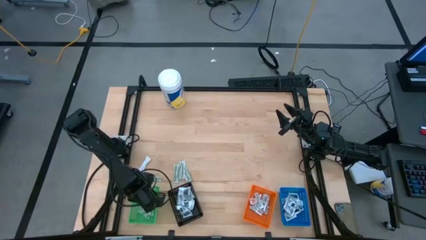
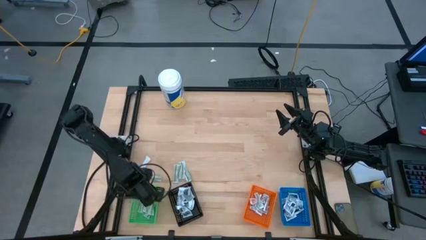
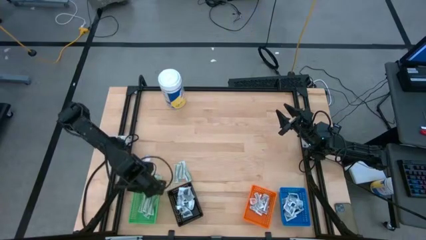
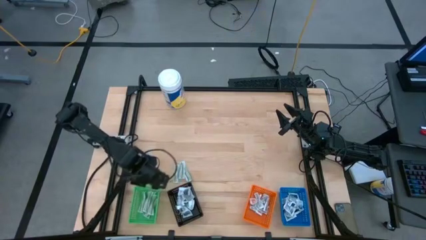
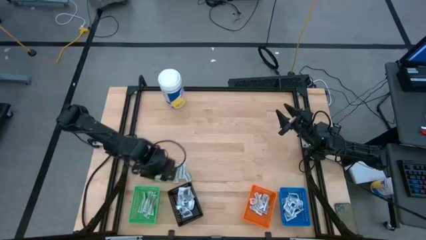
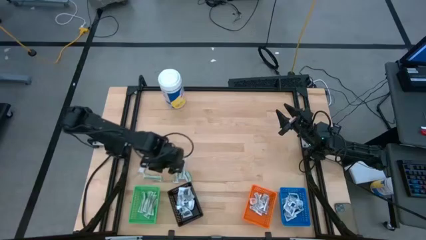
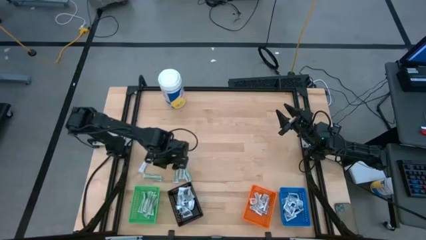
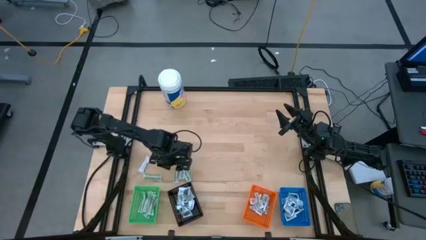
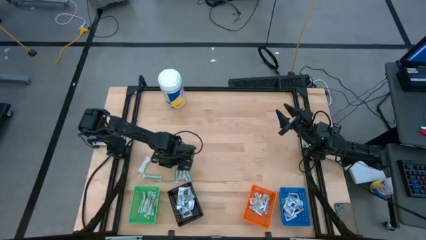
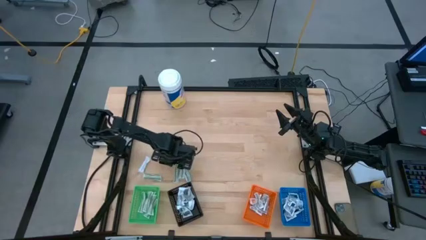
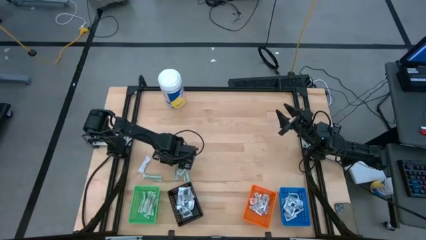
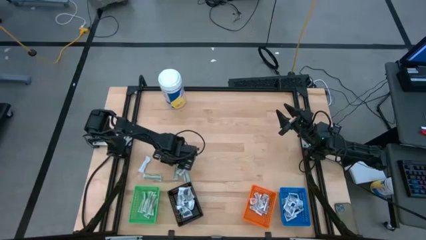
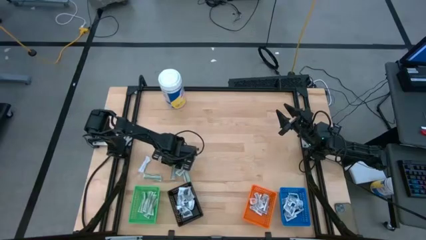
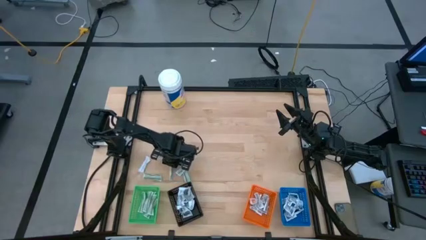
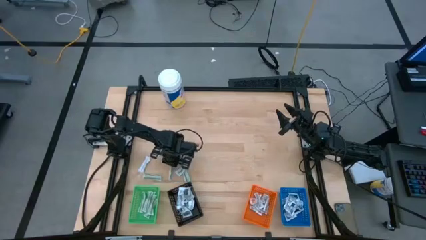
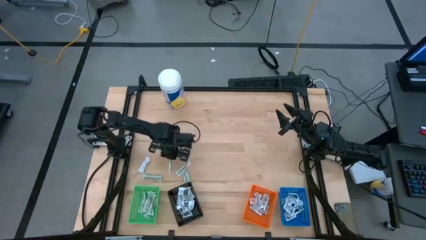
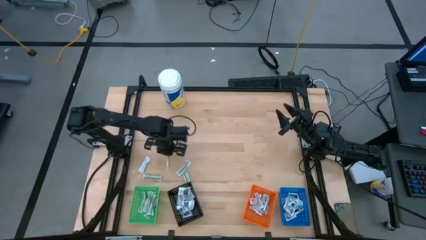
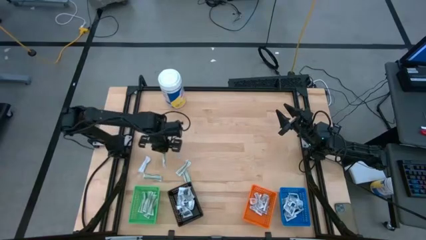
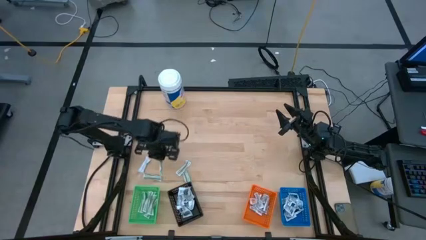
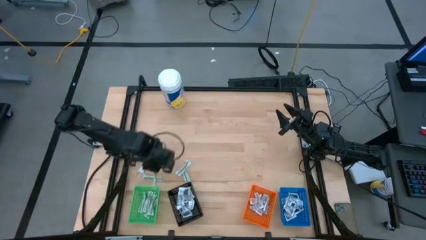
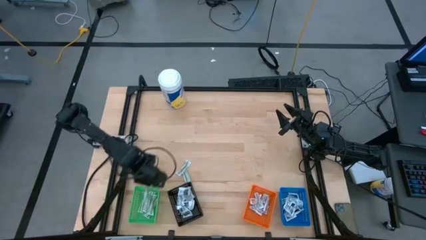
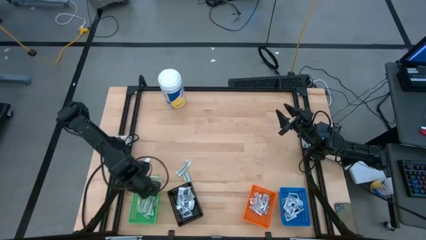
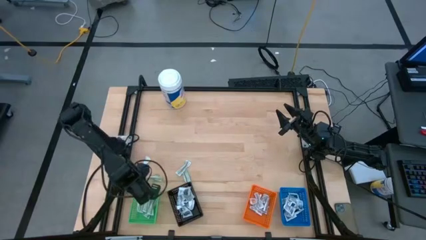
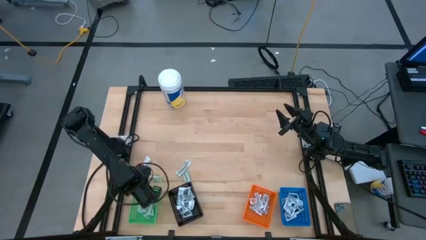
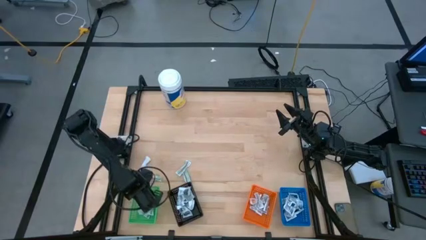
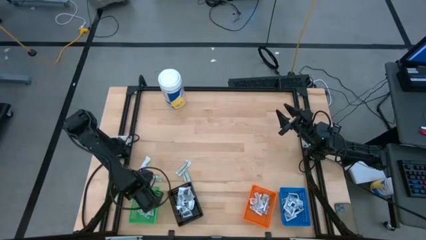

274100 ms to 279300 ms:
Task: Pick & Place First Aid Supplies
Put the bandage into the green bin

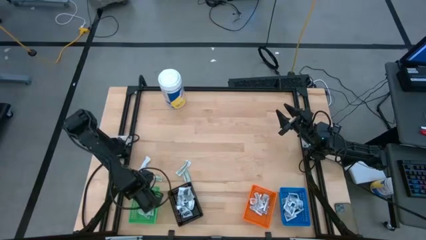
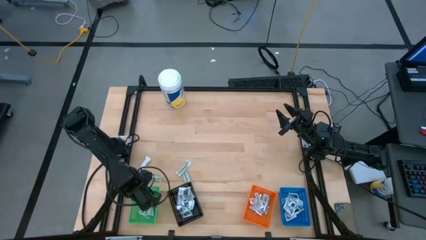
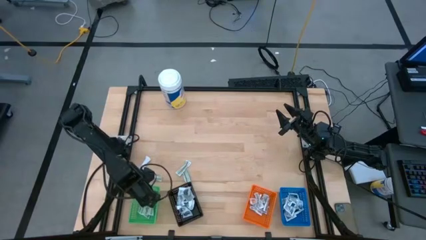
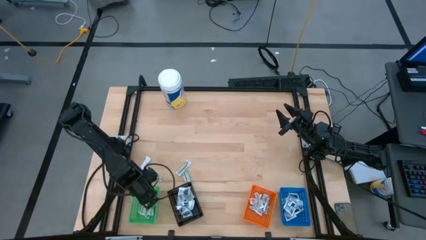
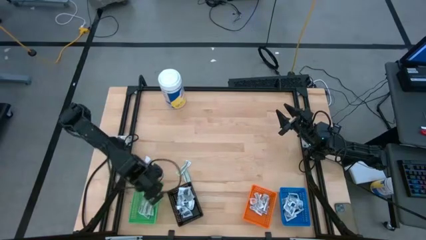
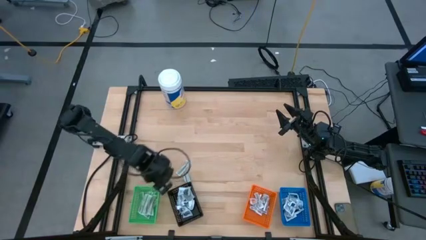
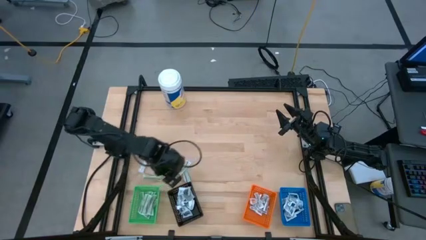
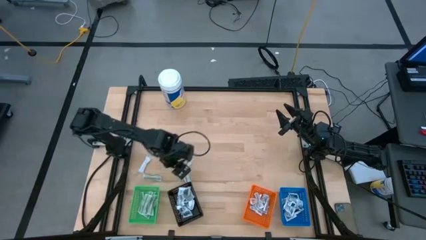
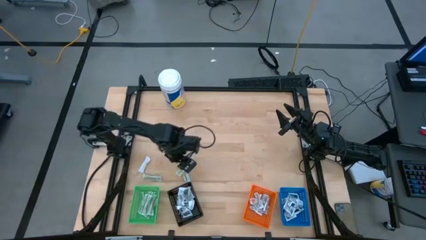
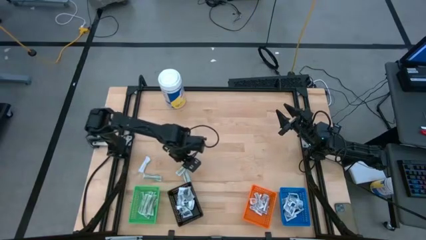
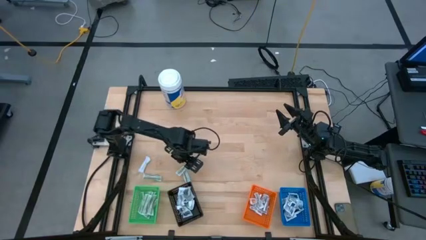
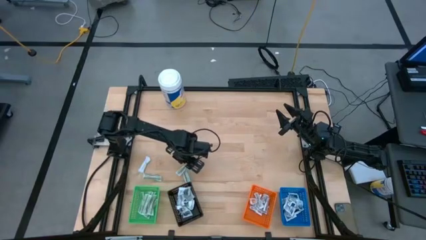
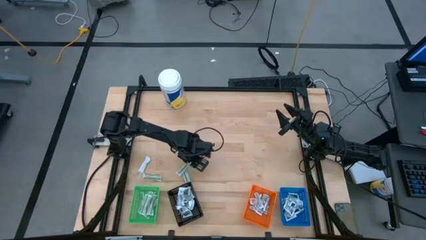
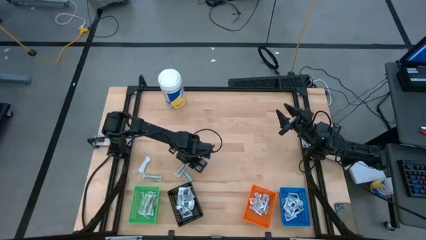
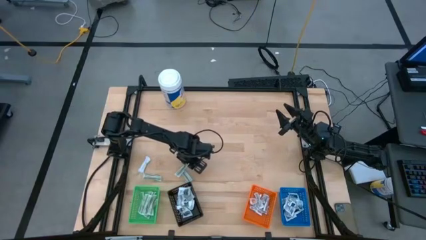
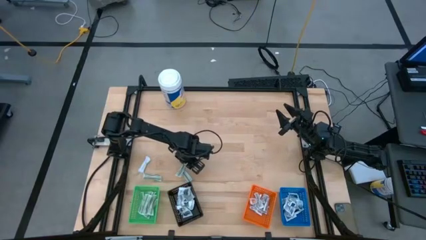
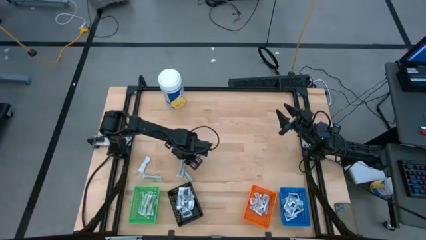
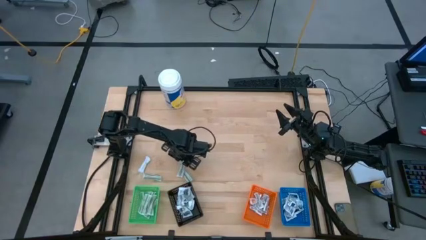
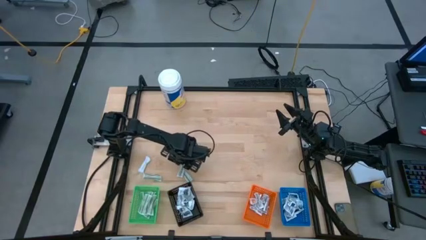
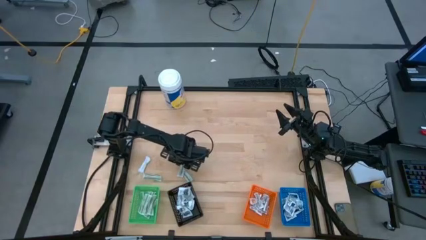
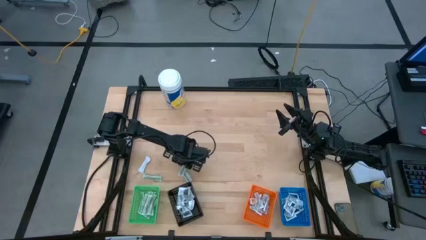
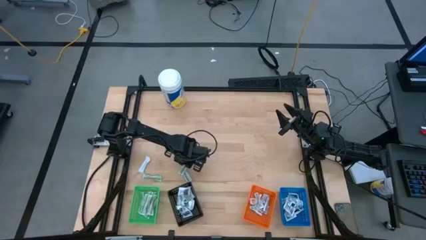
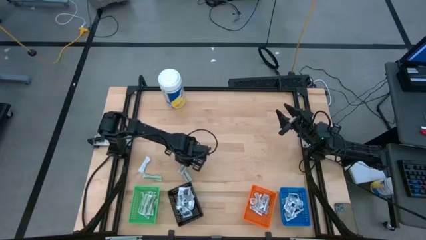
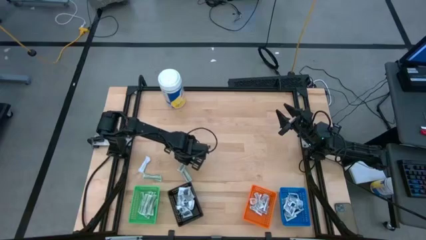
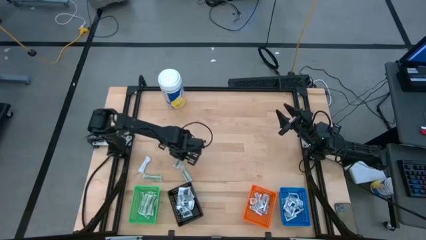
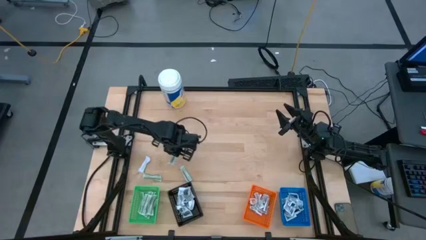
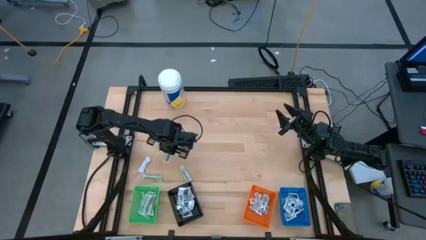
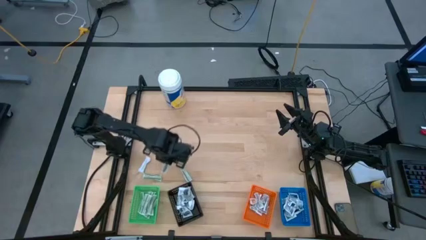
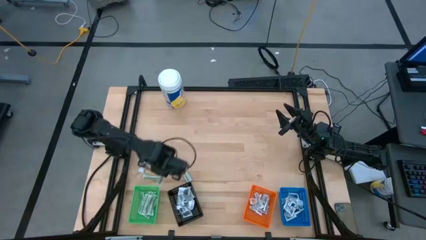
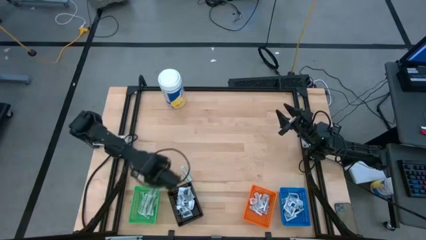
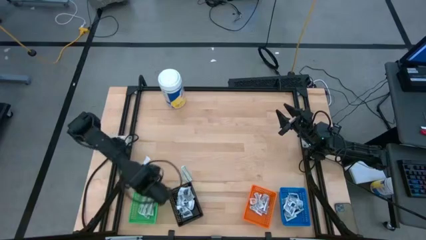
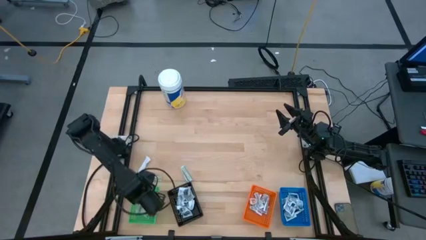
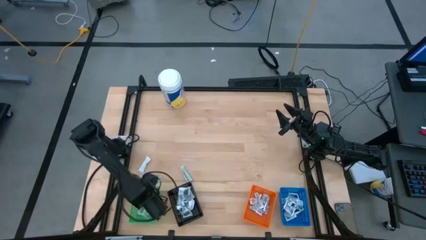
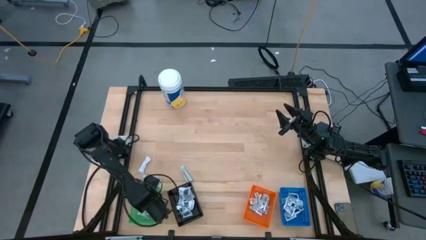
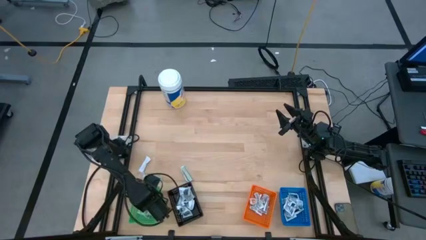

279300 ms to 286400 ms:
Put the bandage into the green bin

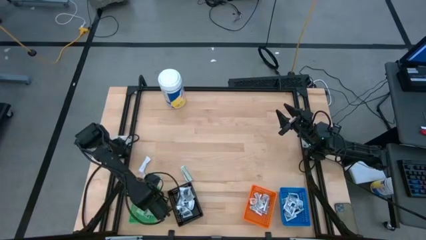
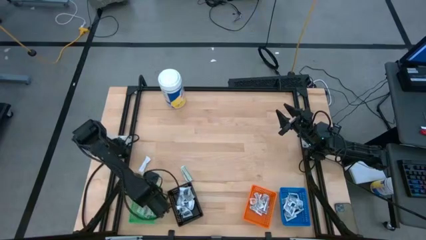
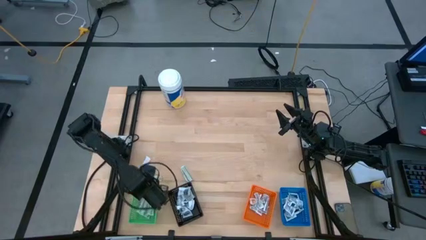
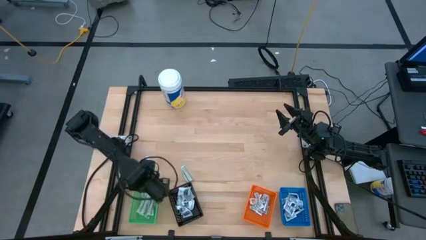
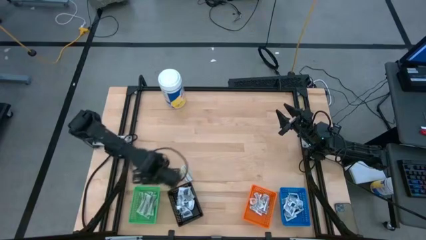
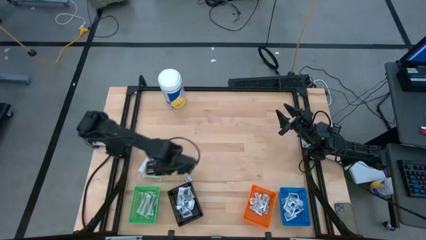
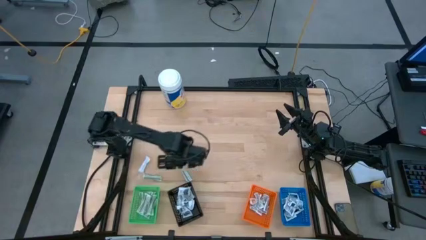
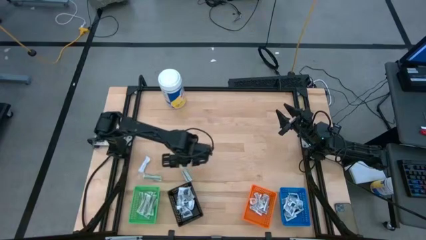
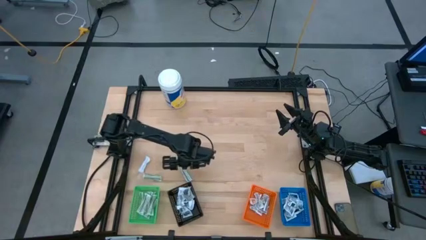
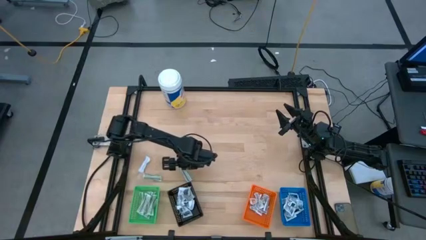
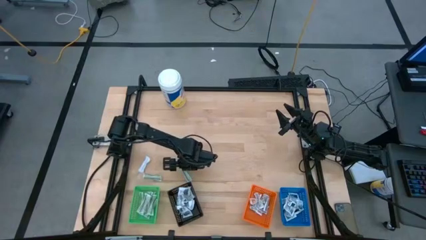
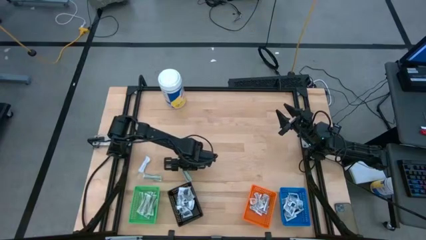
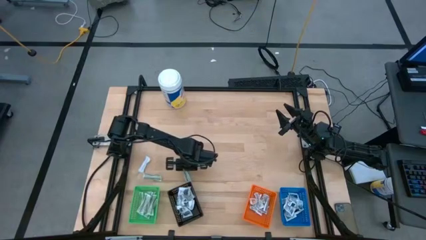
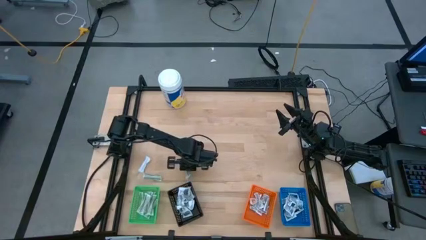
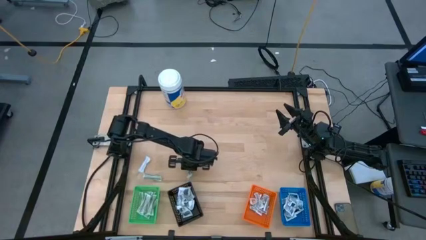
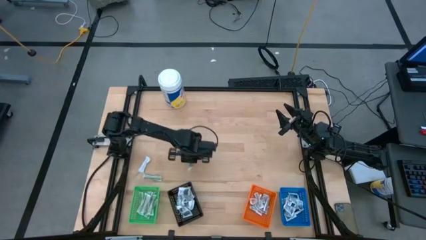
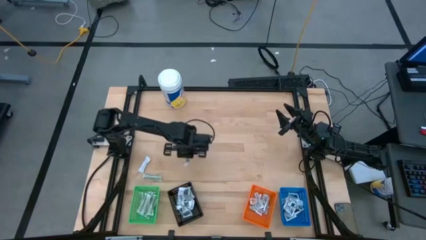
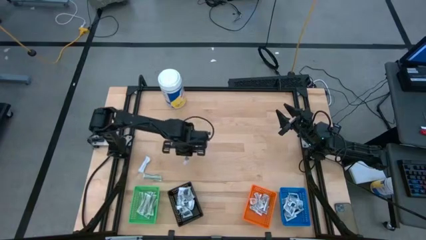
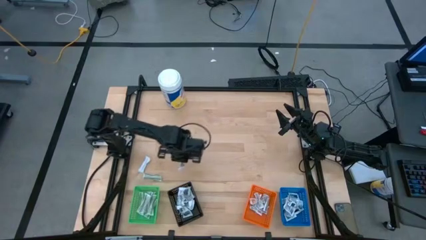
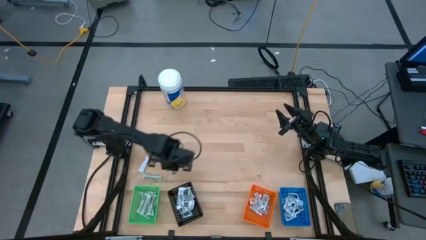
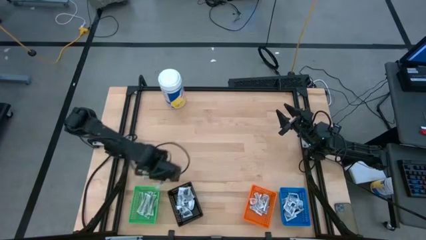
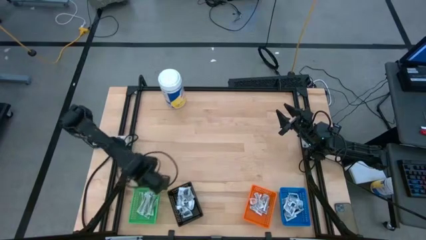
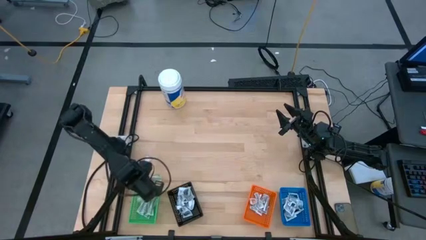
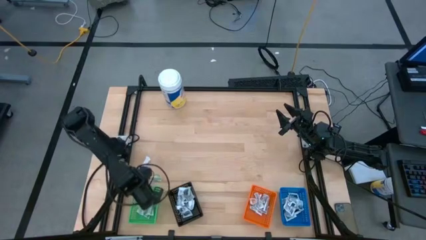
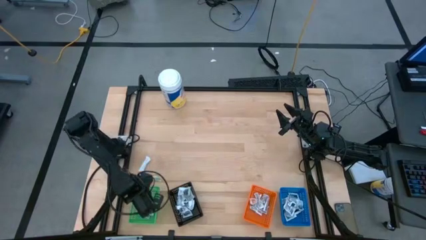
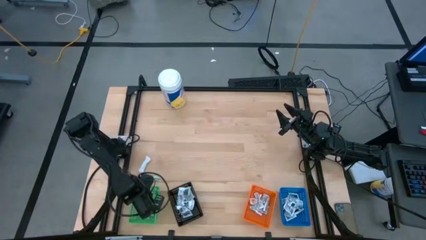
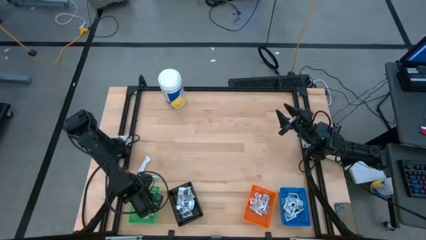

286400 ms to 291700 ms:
Put the bandage into the green bin
